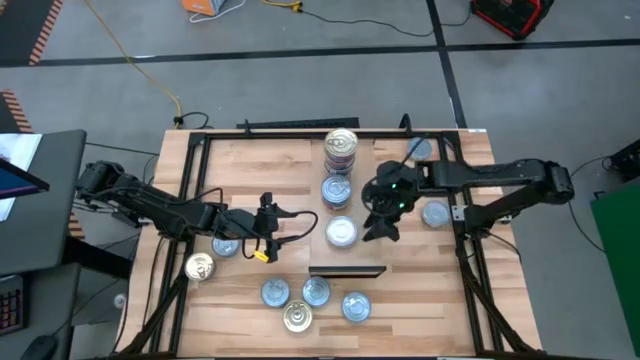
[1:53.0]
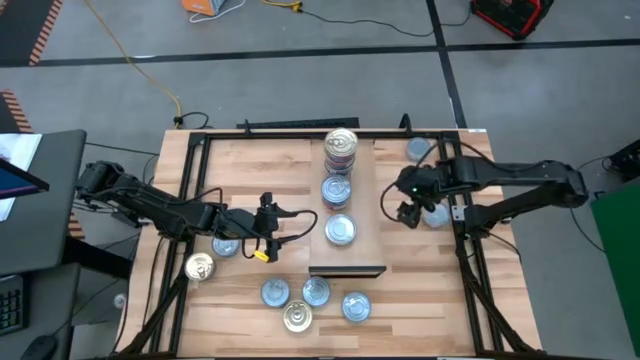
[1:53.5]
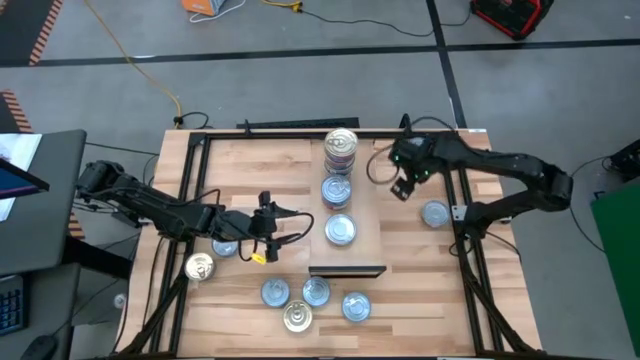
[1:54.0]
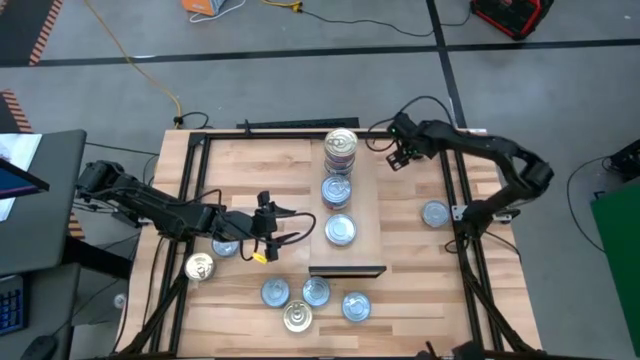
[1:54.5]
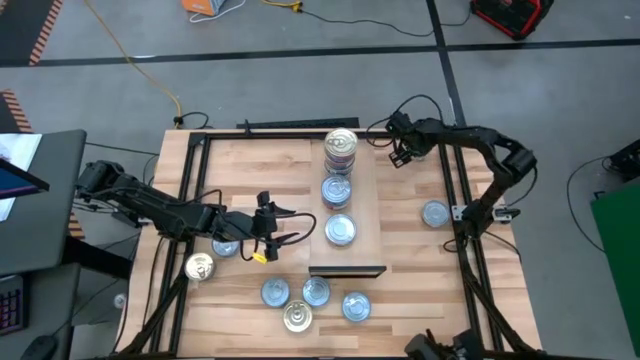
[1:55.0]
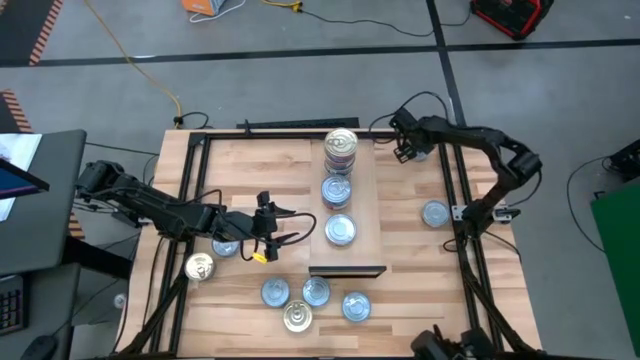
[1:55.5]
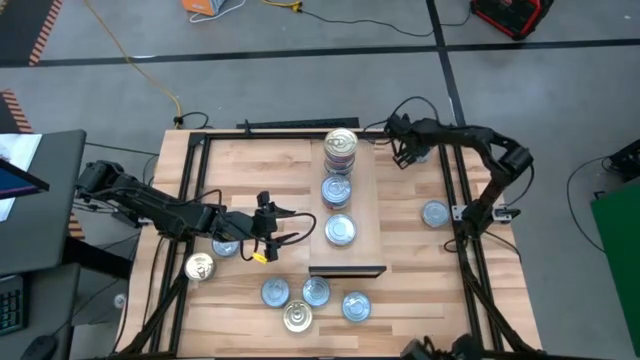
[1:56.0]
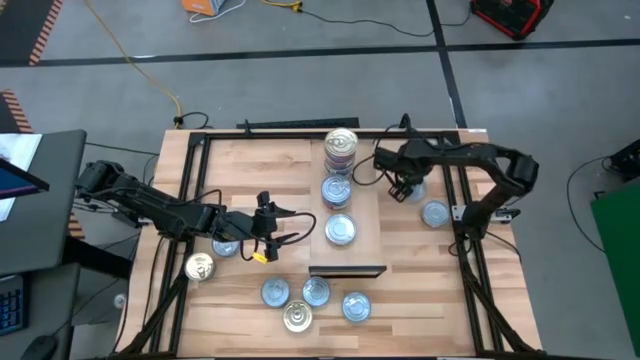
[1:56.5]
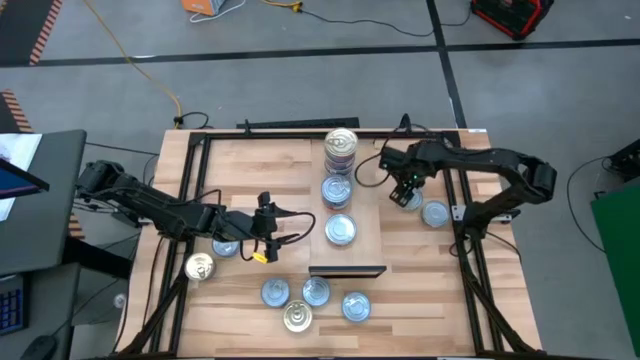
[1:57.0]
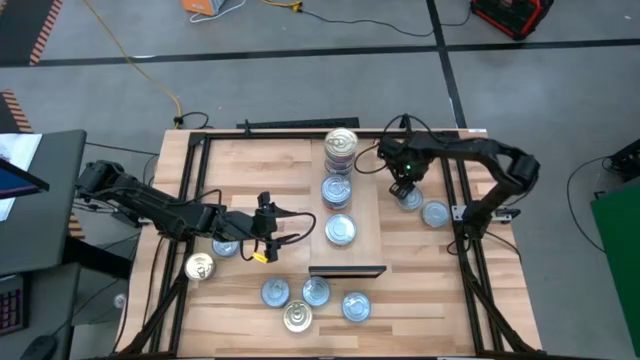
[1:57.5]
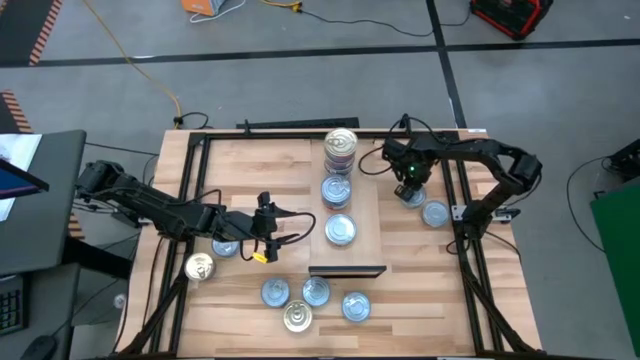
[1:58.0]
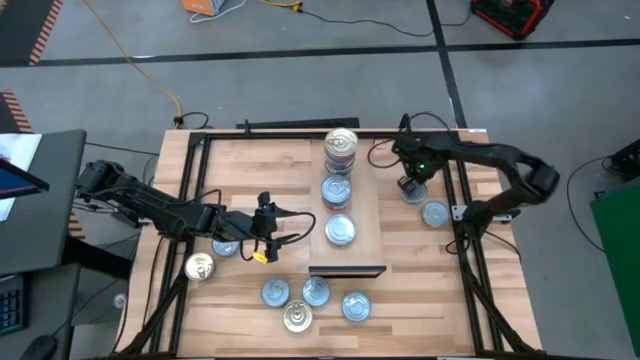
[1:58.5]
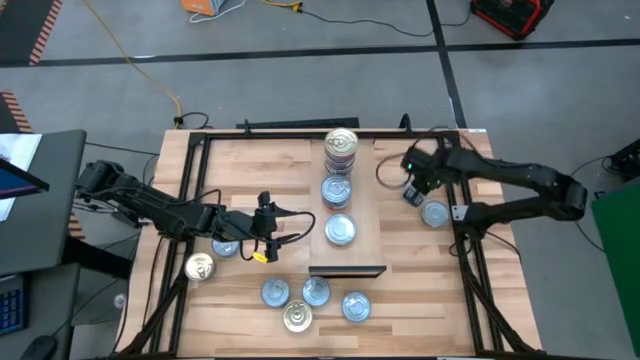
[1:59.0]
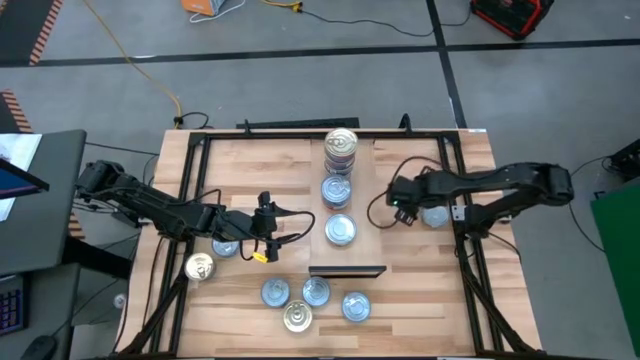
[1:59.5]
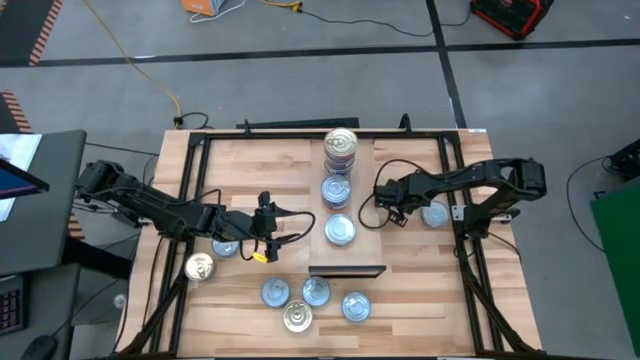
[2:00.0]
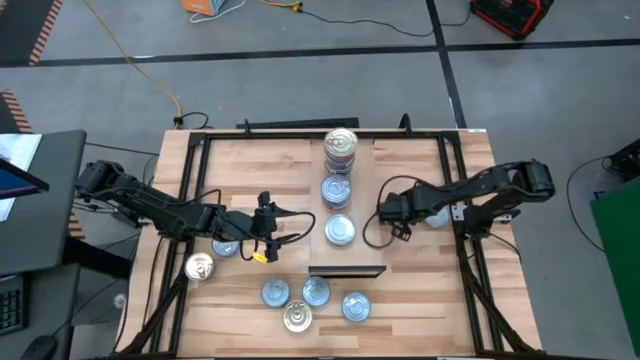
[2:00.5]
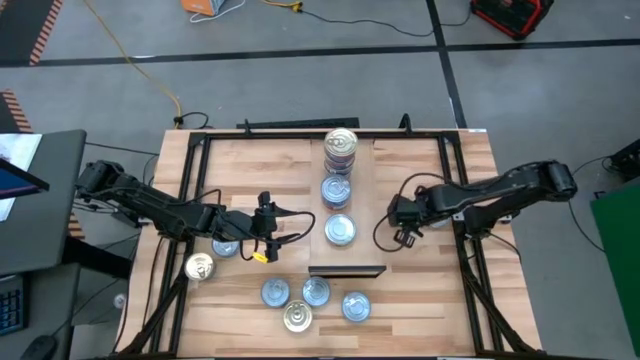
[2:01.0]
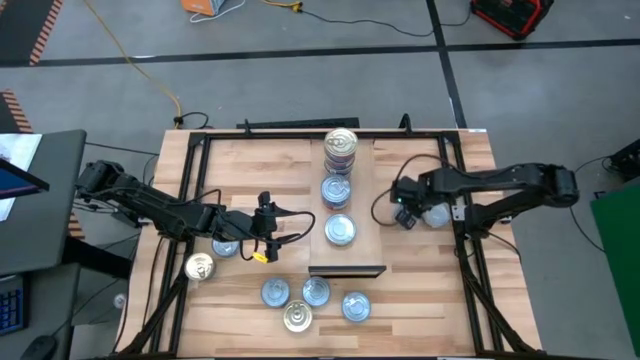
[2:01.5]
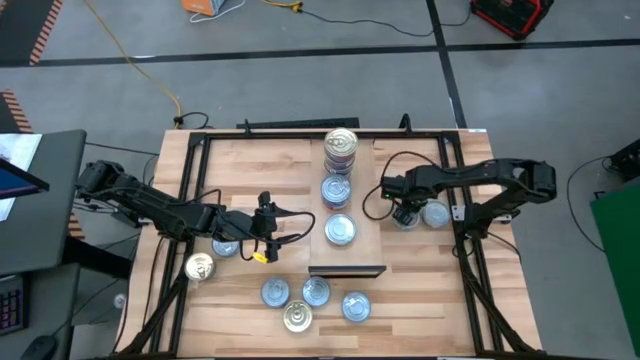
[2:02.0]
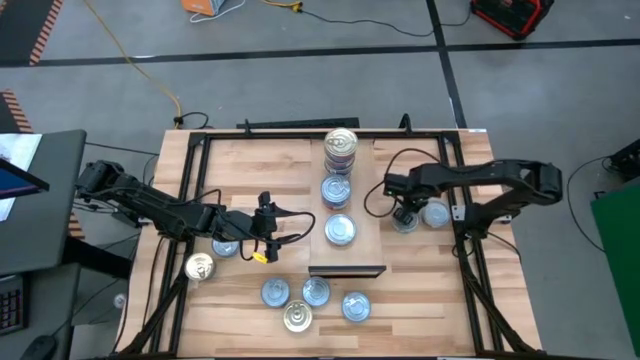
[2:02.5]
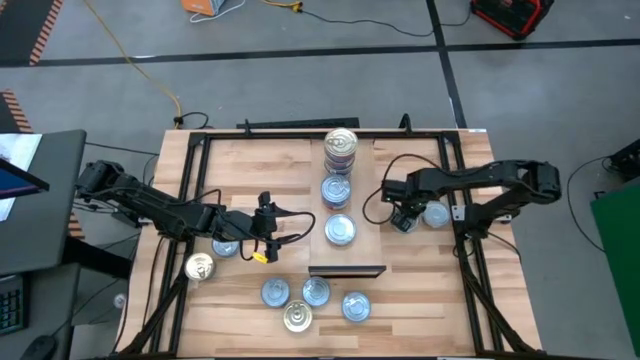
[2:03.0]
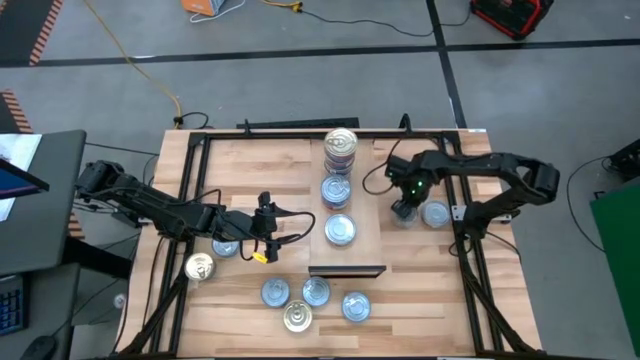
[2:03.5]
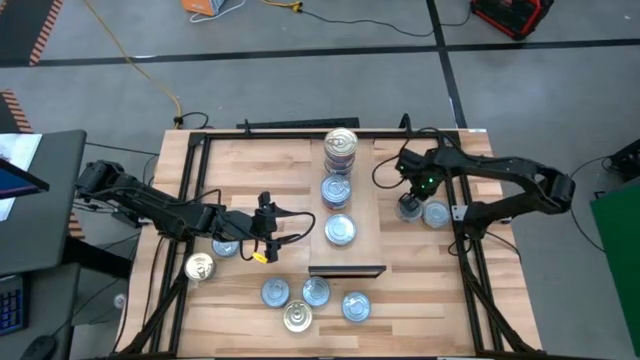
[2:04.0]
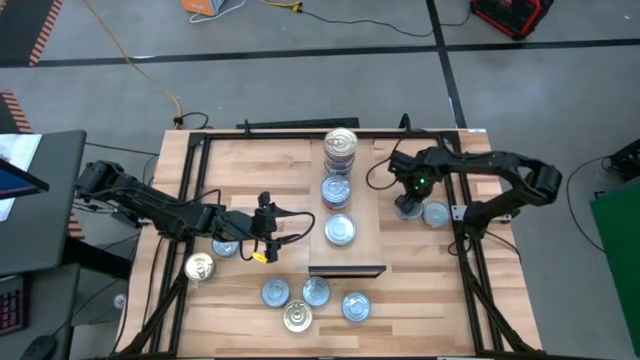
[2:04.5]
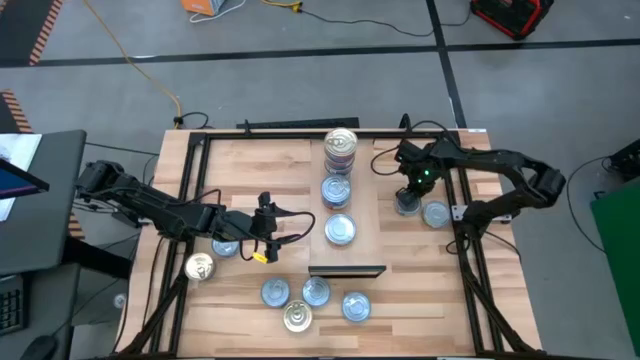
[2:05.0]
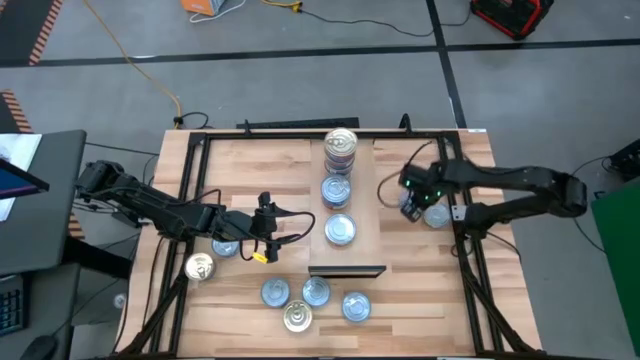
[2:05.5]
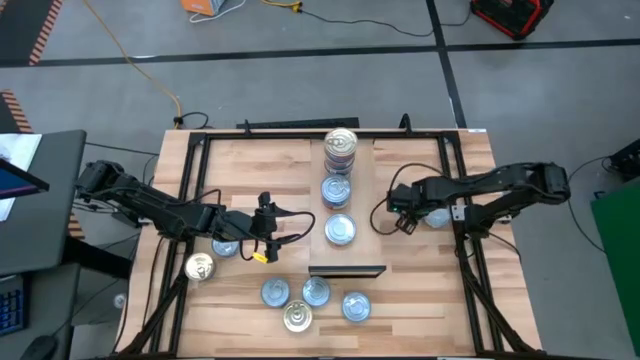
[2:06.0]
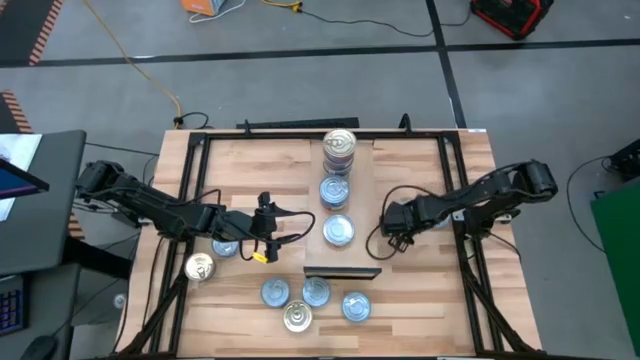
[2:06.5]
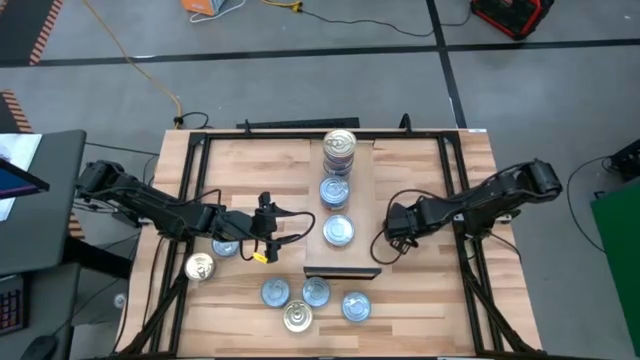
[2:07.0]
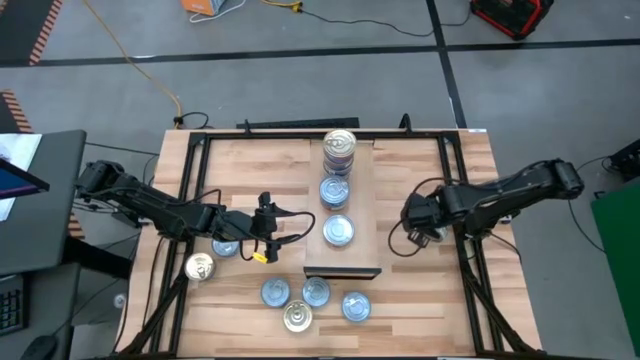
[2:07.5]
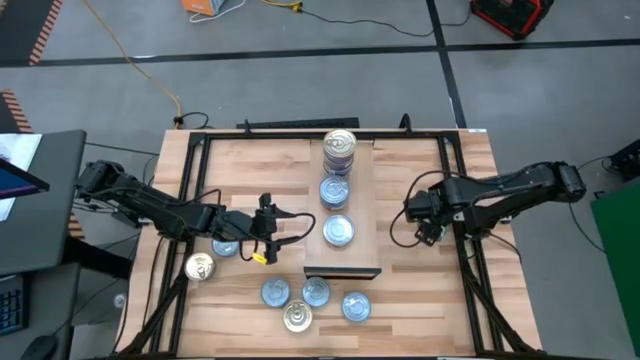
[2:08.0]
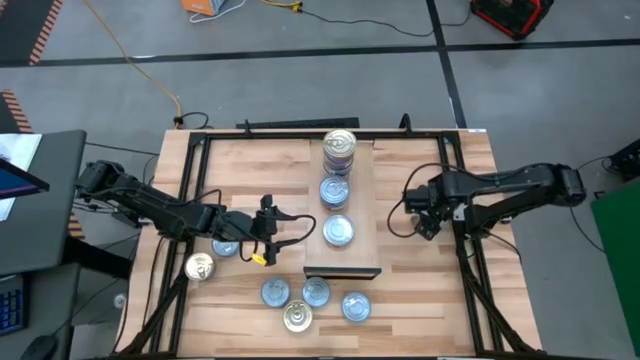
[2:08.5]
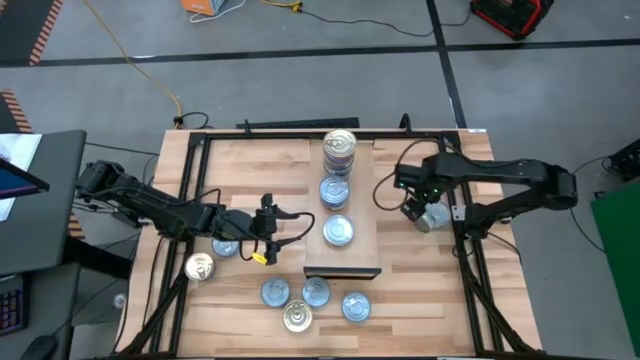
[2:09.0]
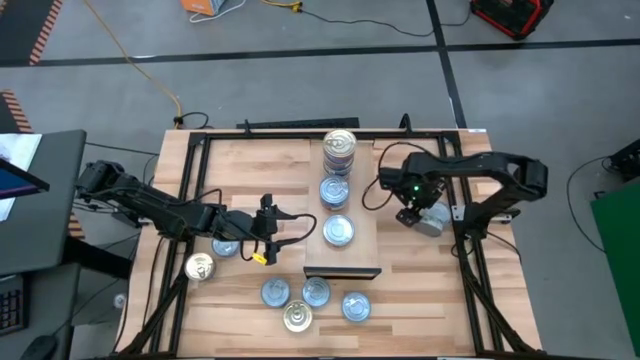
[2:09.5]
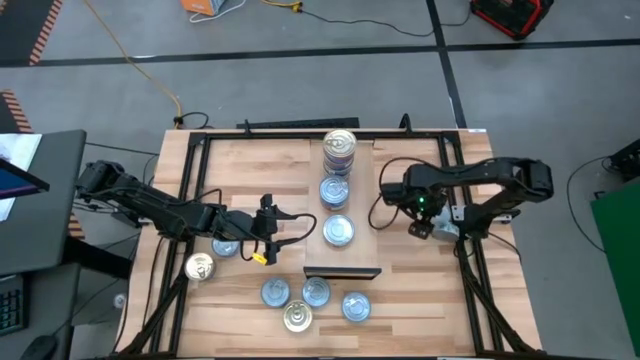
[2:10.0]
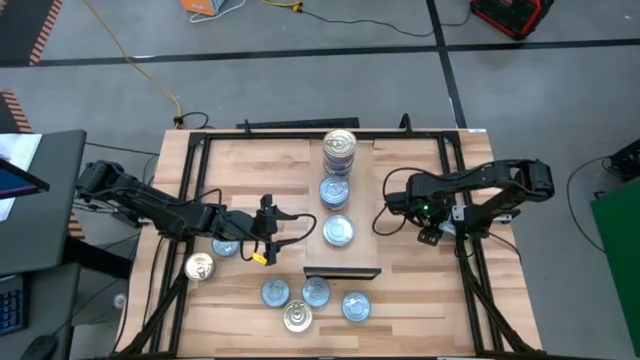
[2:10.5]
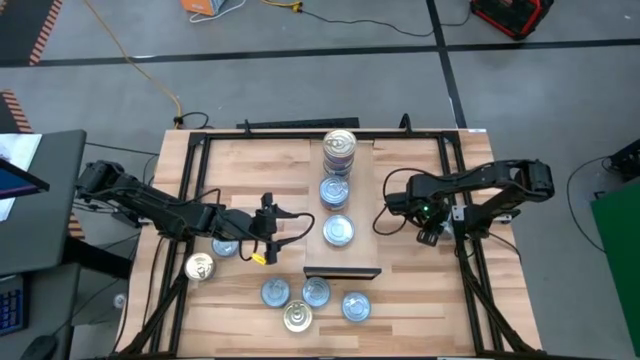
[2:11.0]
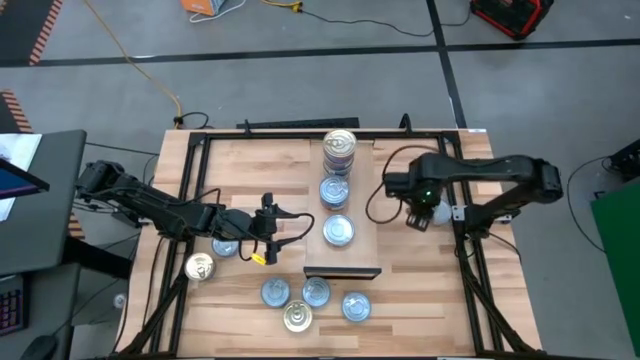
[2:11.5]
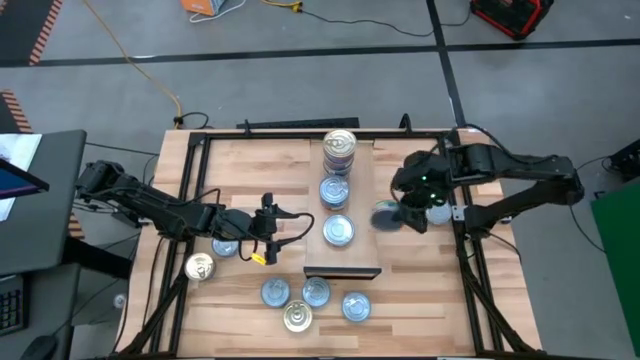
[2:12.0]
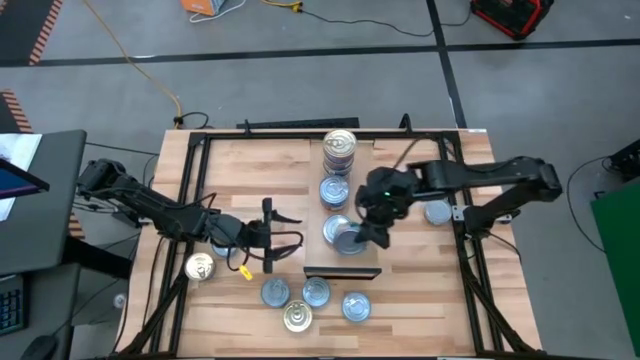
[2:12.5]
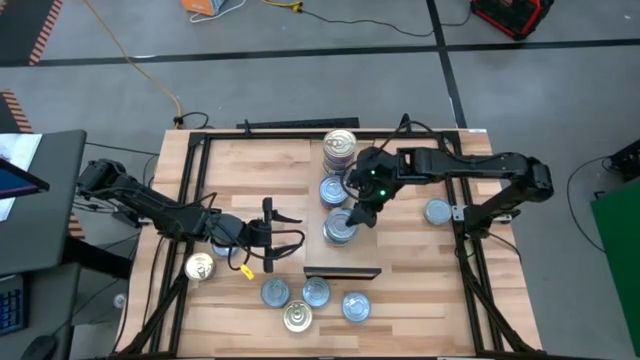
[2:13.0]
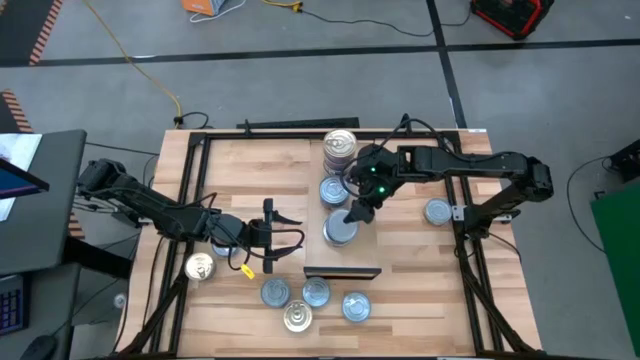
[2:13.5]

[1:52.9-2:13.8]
Task: Stack canned seafood by type on shelf
Stack the green and white tuna can on top of the green and white tuna can on the shelf
